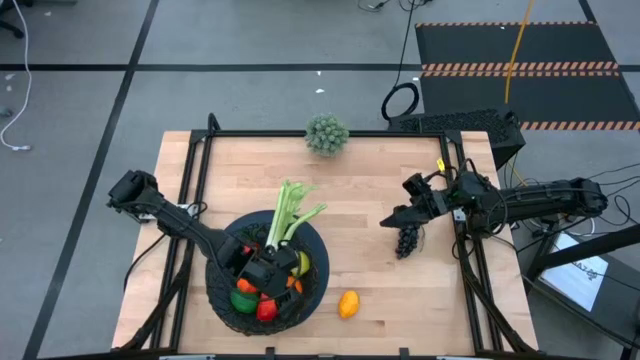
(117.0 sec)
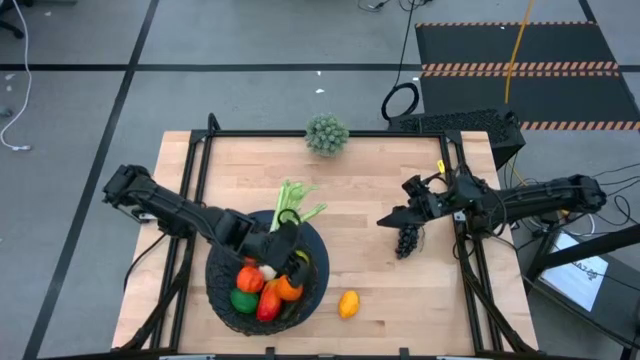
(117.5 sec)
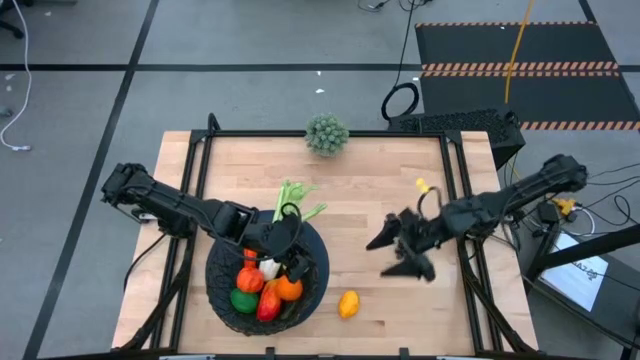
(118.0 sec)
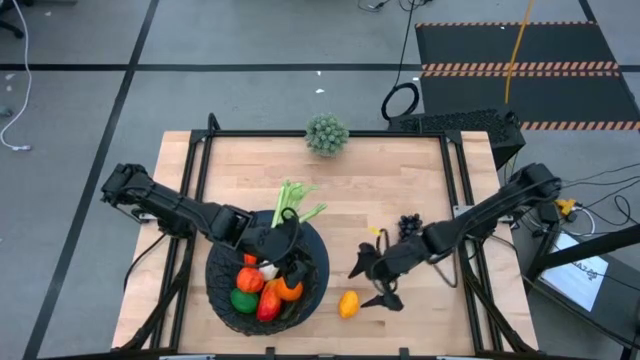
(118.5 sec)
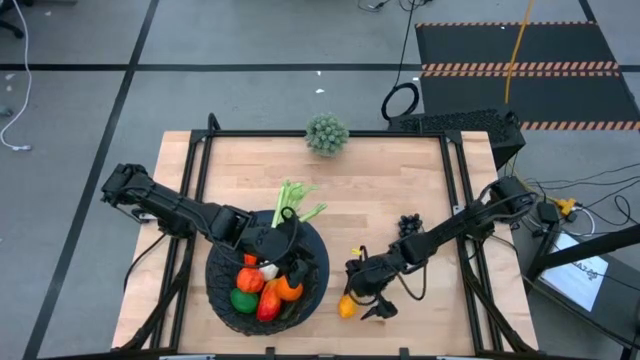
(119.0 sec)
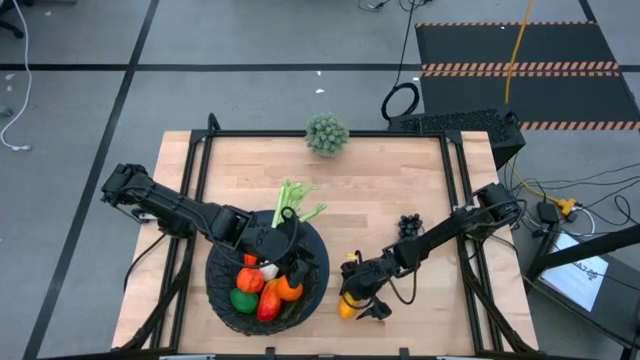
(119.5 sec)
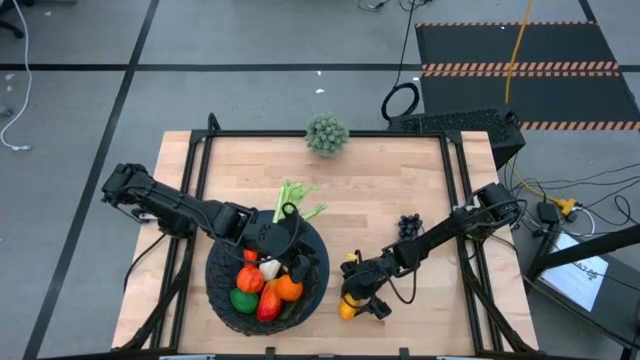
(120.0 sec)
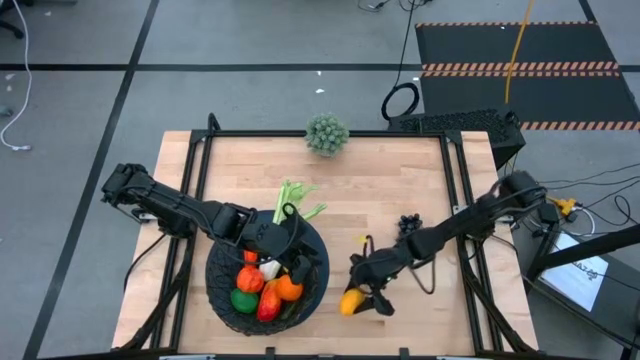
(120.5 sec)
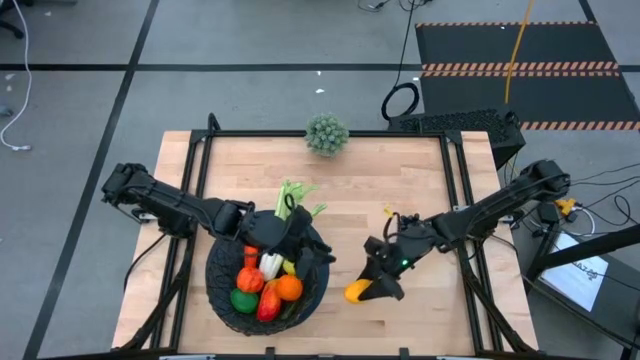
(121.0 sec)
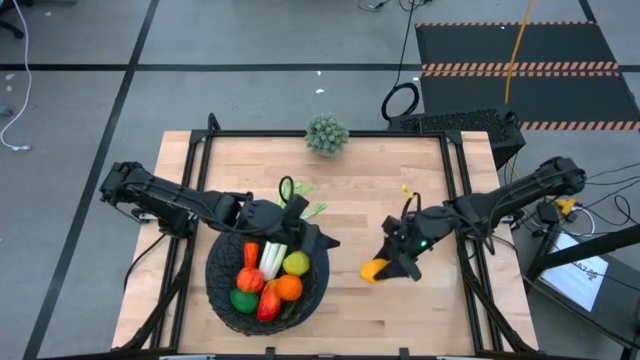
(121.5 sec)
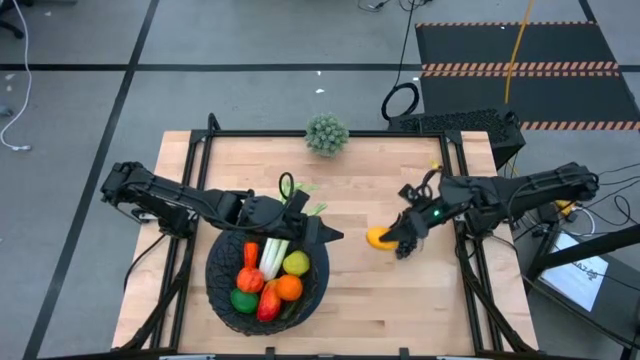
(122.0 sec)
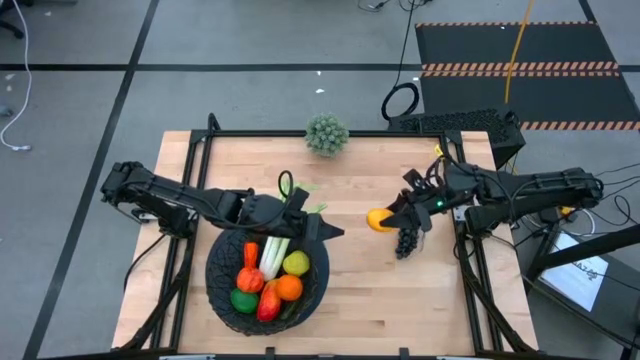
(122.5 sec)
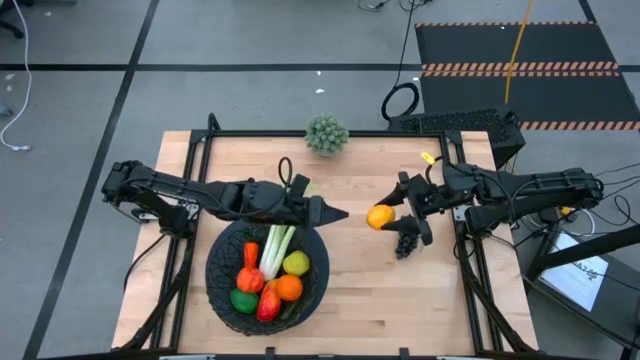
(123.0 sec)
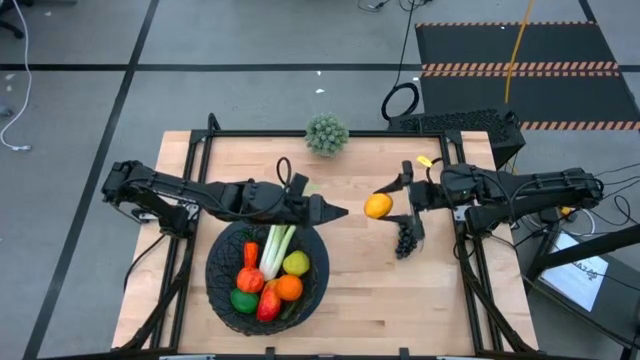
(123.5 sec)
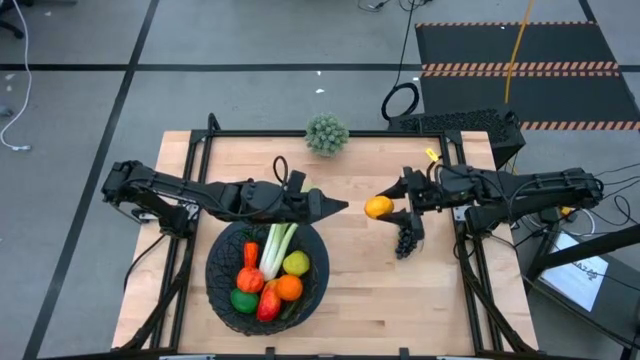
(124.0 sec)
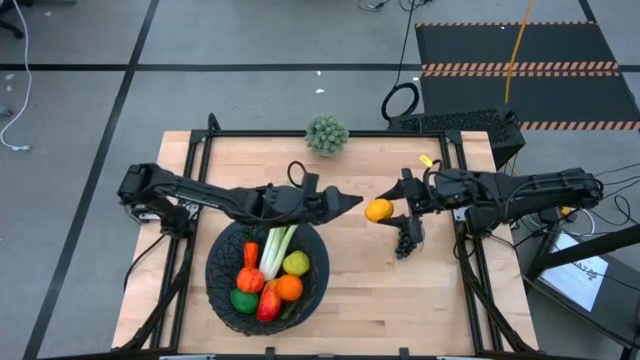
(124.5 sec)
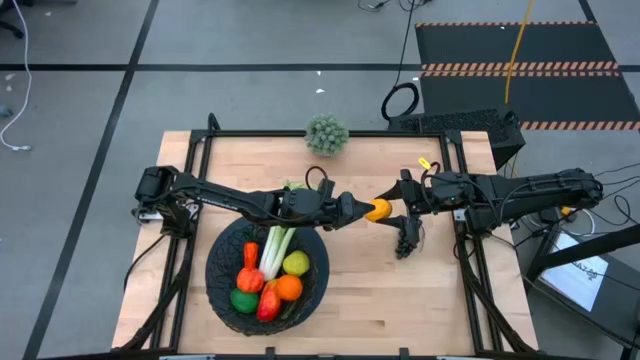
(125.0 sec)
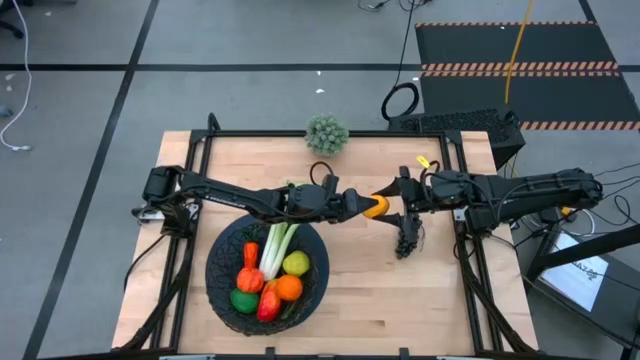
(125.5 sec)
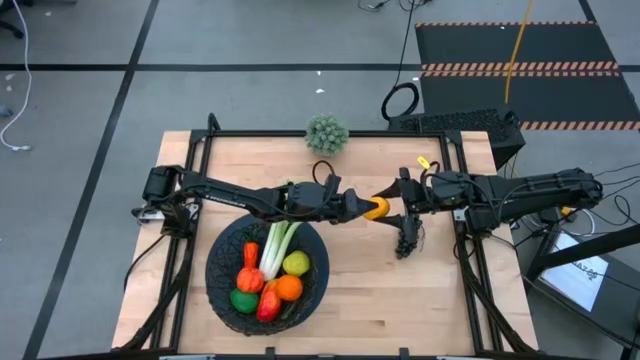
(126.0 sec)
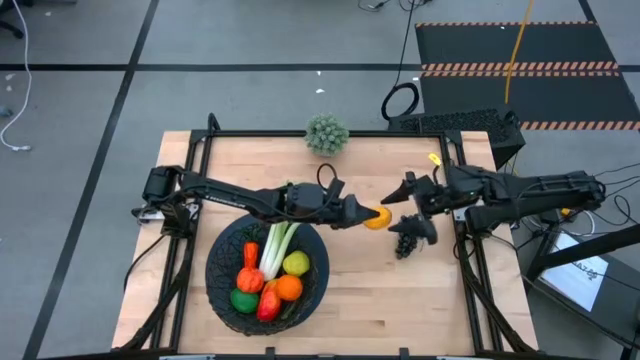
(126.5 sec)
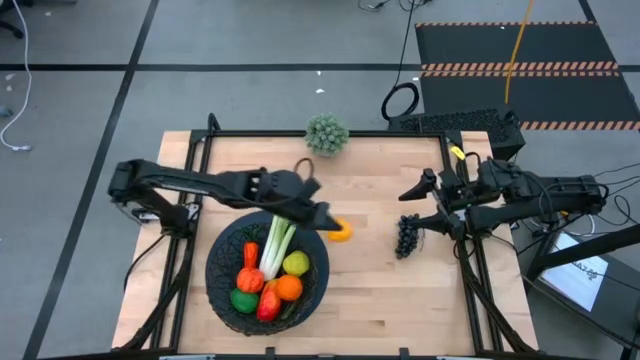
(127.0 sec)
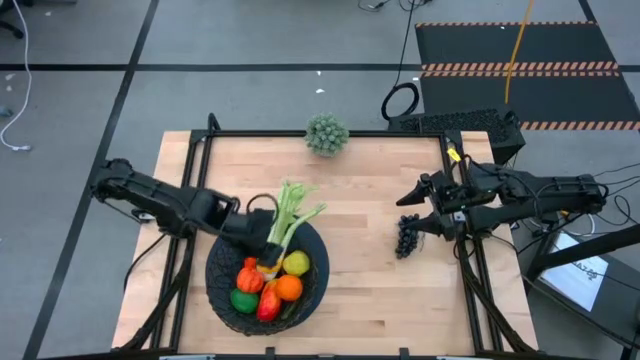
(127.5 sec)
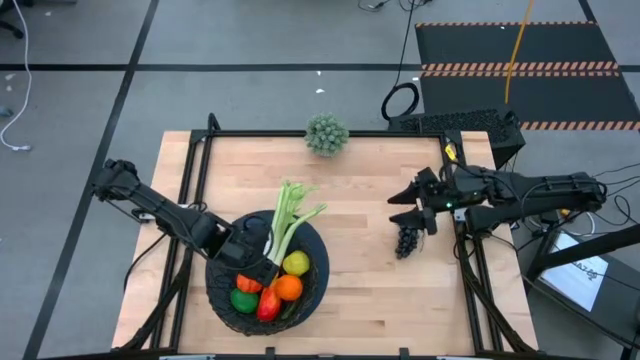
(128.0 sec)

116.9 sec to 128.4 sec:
Task: Build produce basket
Put the yellow lemon into the black wire basket

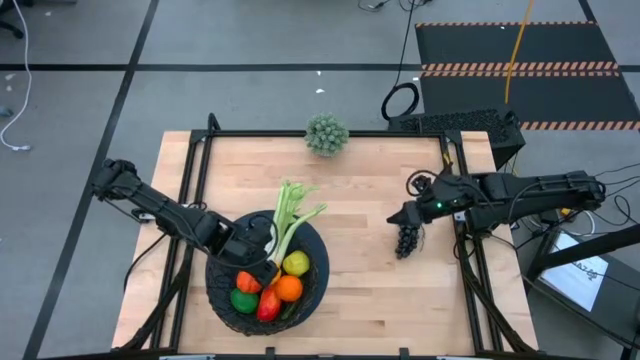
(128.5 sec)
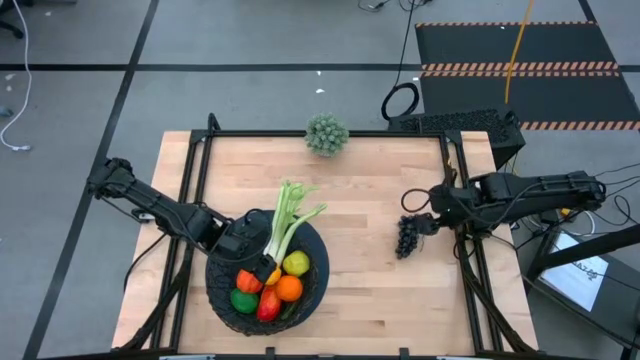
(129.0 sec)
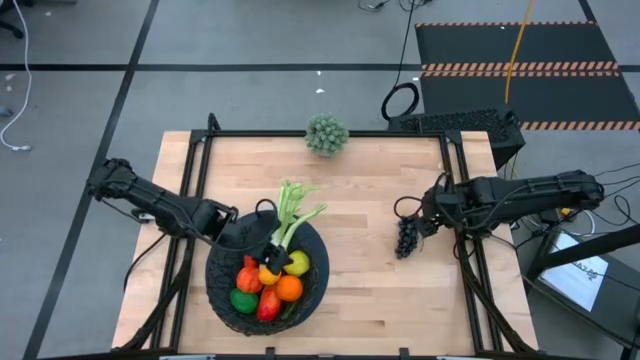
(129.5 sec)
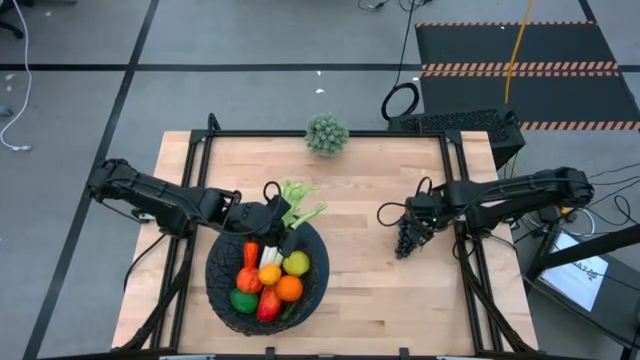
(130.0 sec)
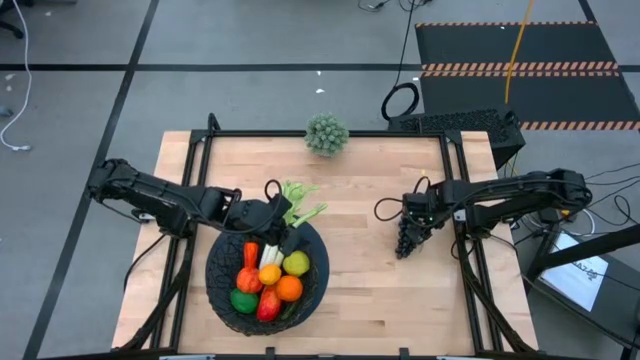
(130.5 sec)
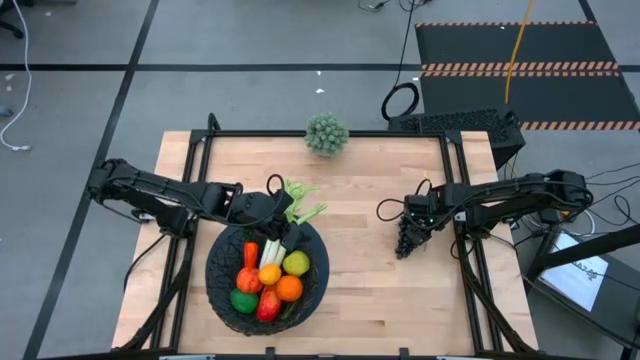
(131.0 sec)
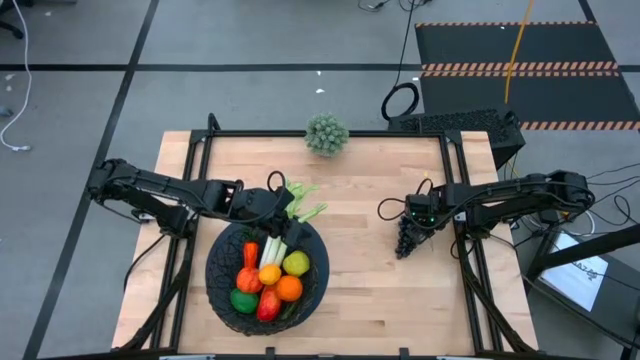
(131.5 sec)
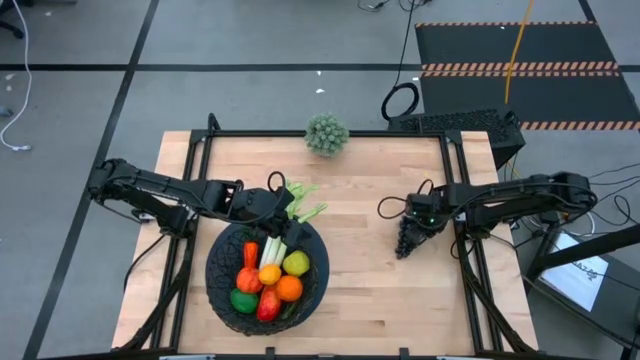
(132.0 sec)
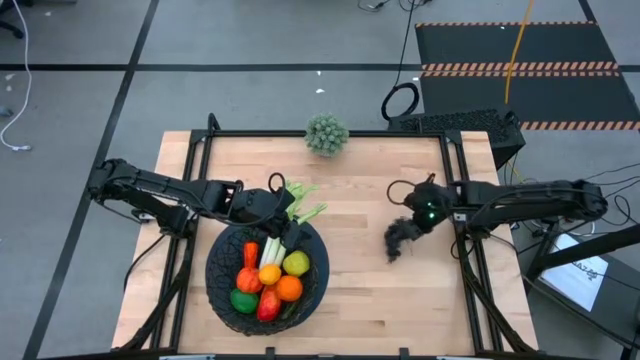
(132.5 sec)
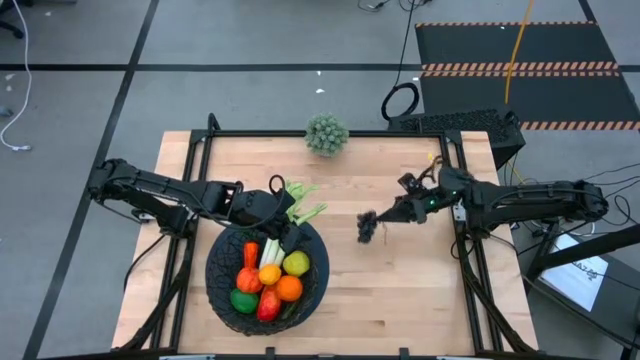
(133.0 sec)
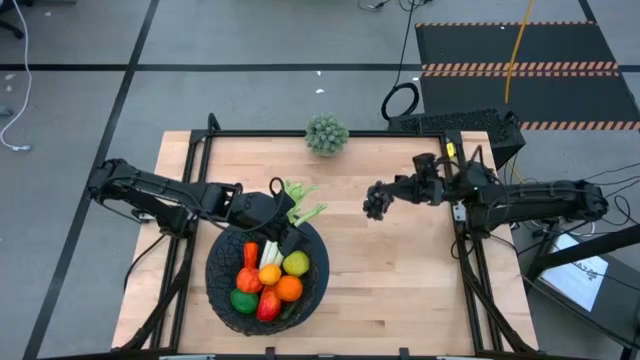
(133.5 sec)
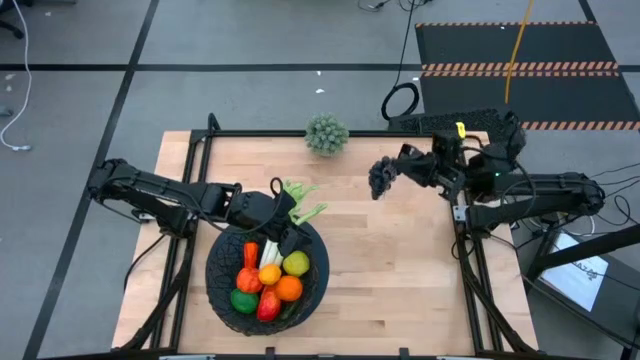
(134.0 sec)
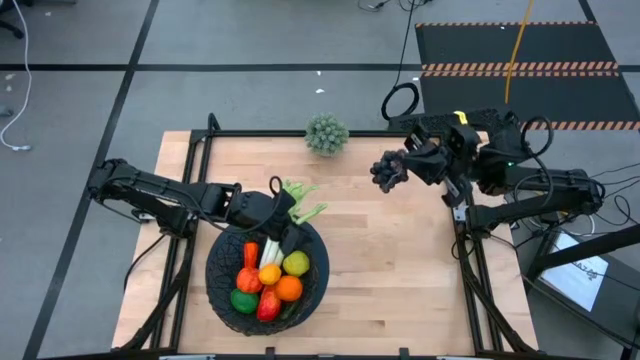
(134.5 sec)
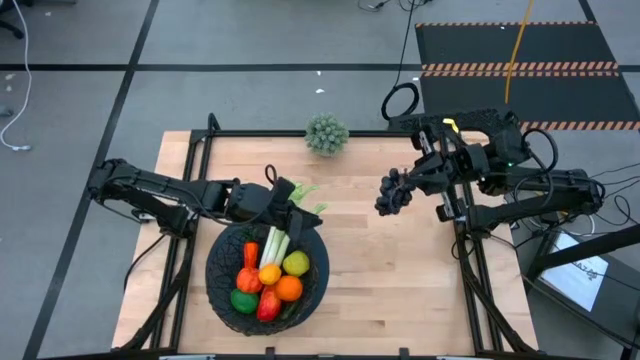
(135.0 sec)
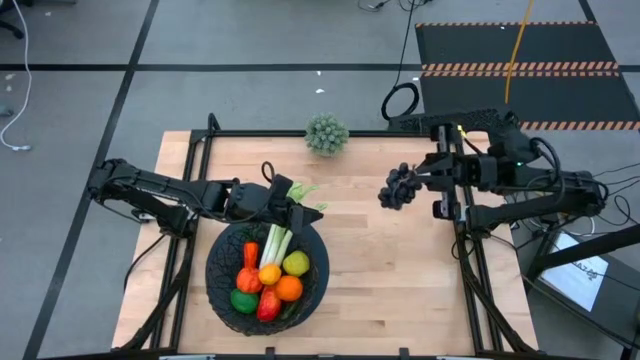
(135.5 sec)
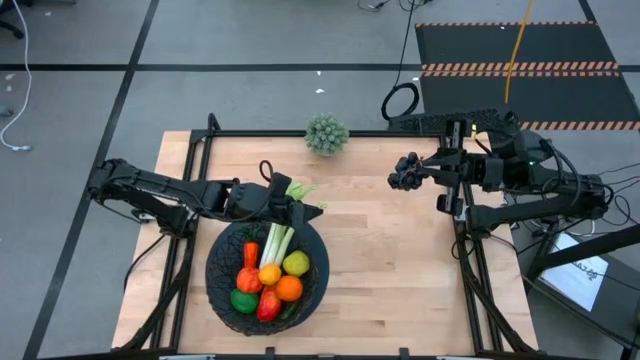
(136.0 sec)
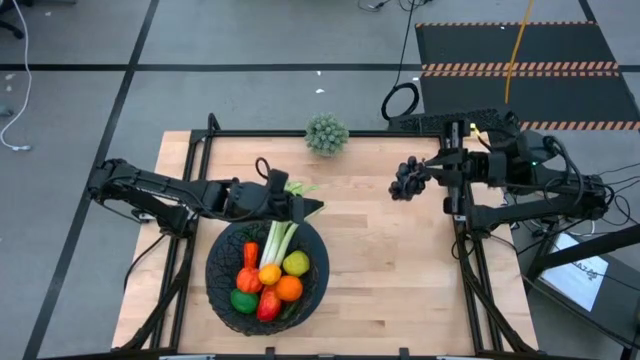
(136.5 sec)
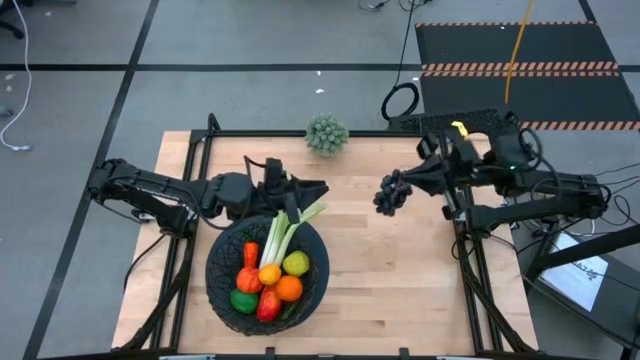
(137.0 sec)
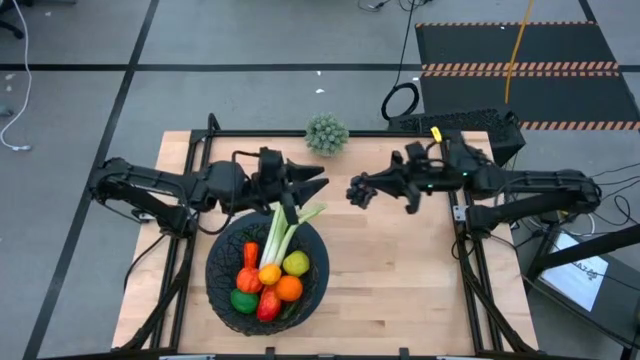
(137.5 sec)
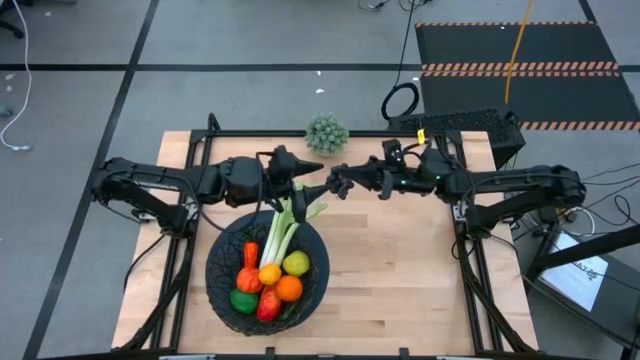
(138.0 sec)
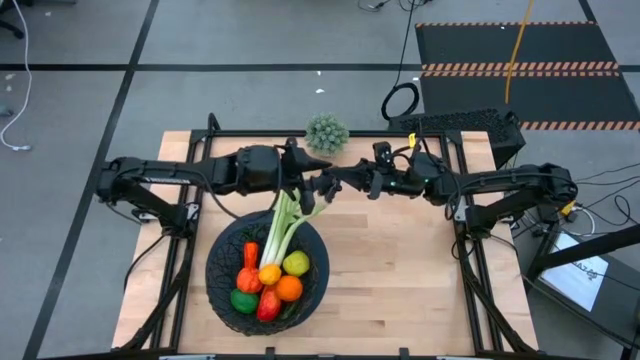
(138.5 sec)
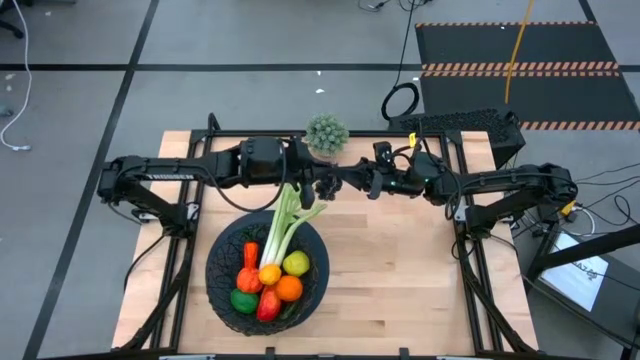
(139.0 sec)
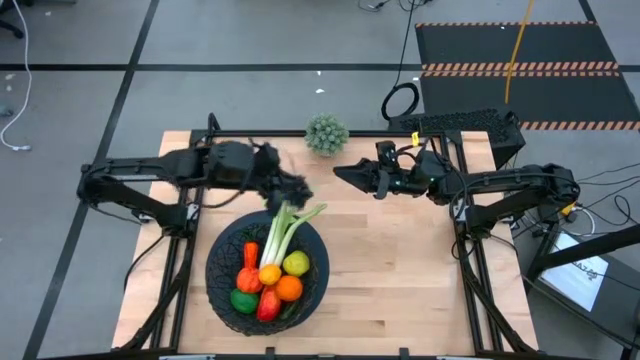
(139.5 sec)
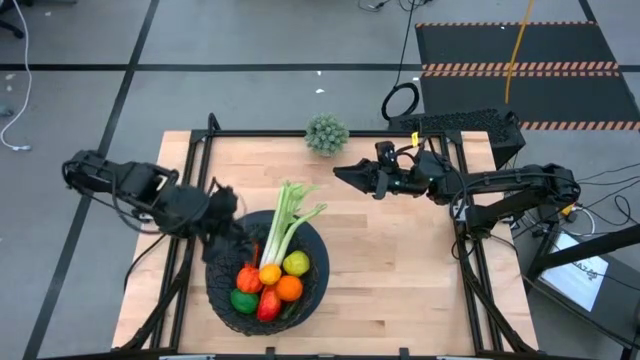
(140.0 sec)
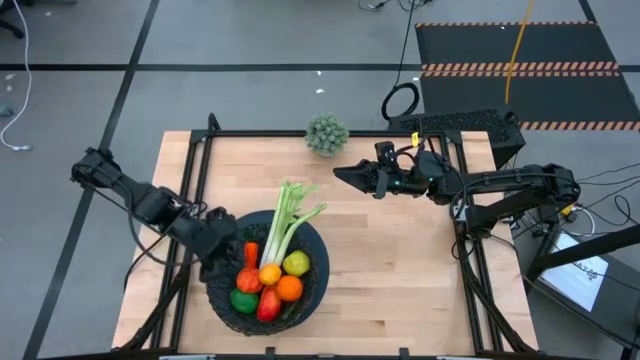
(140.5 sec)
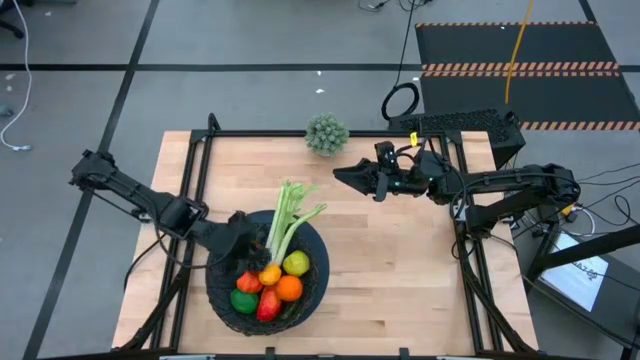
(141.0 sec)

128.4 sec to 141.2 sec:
Put the black grapes into the black wire basket
